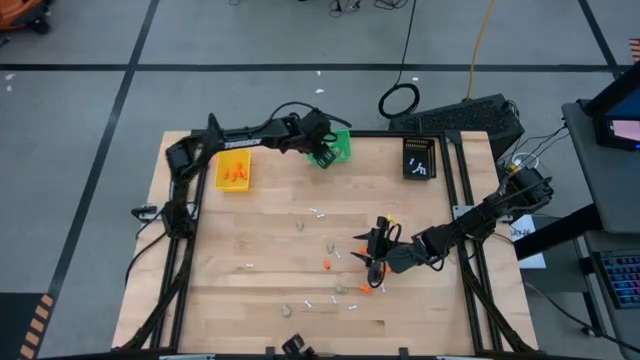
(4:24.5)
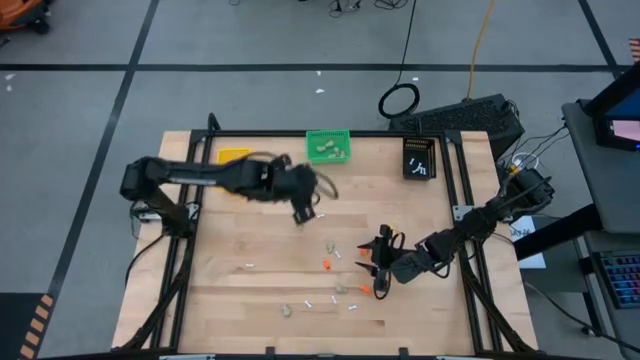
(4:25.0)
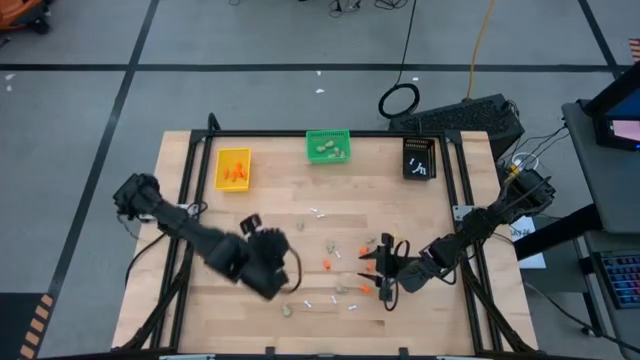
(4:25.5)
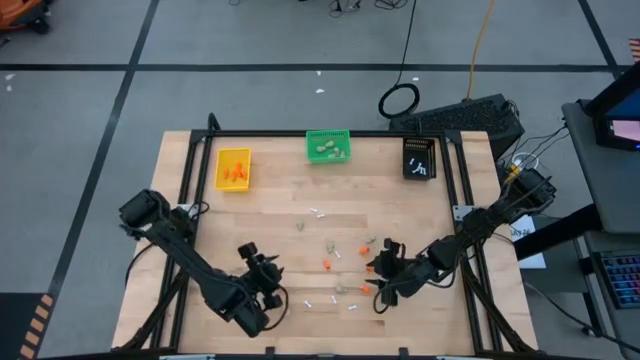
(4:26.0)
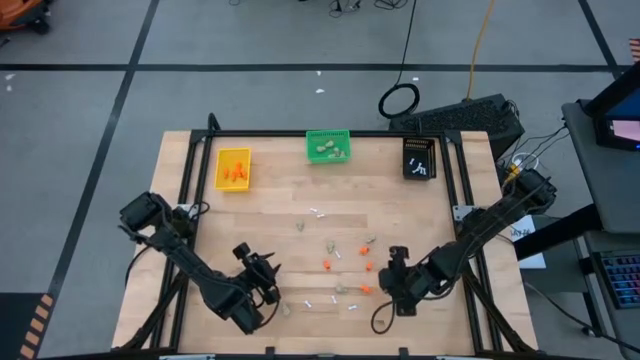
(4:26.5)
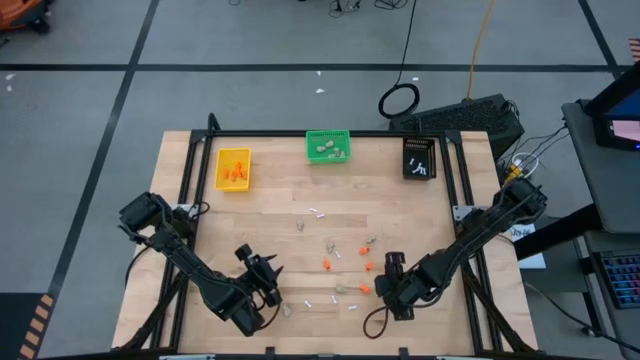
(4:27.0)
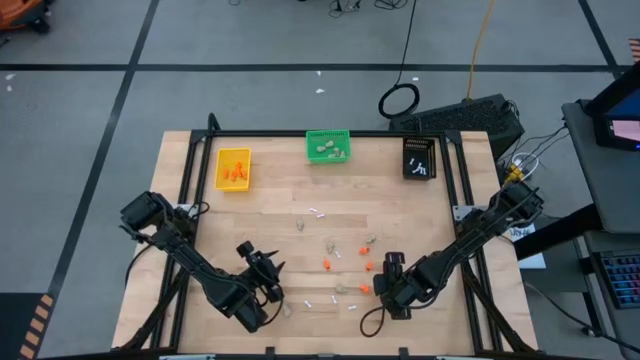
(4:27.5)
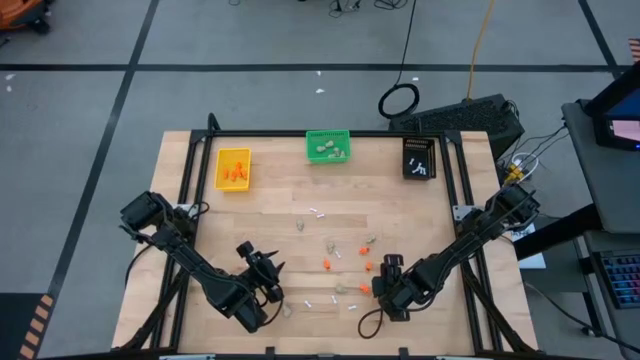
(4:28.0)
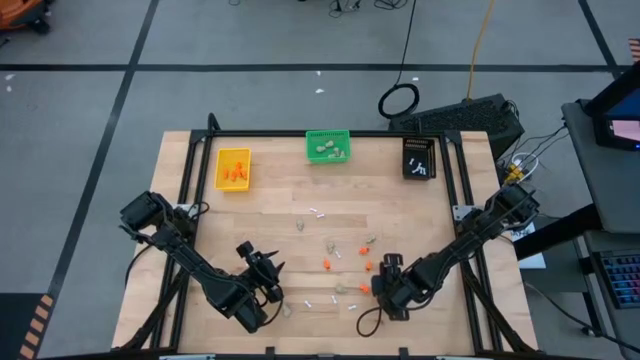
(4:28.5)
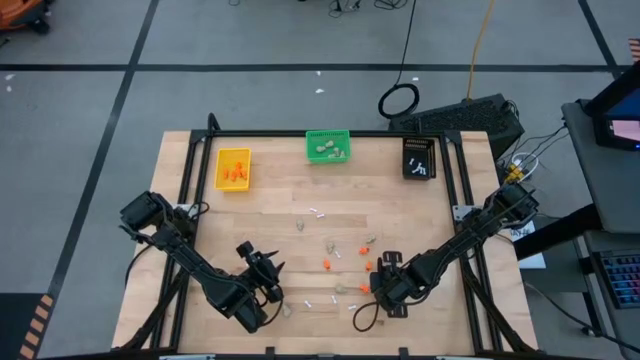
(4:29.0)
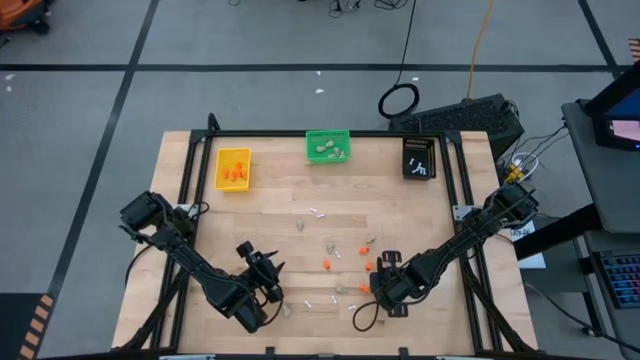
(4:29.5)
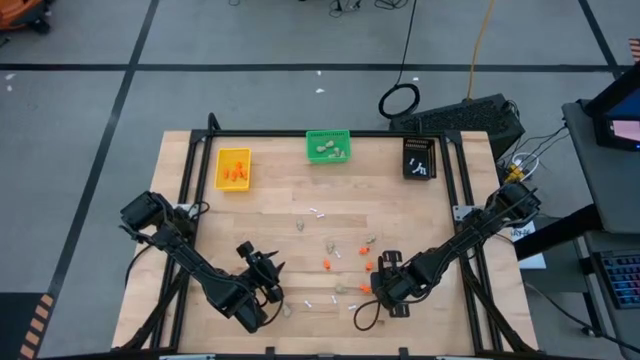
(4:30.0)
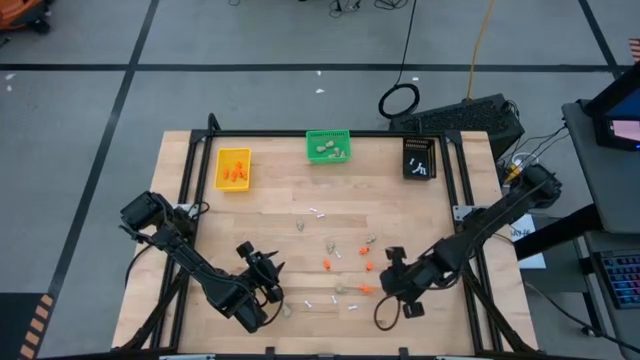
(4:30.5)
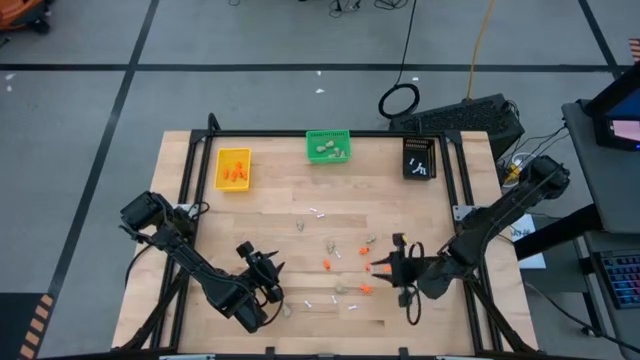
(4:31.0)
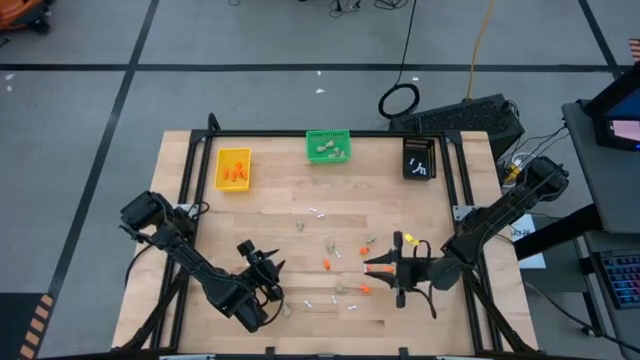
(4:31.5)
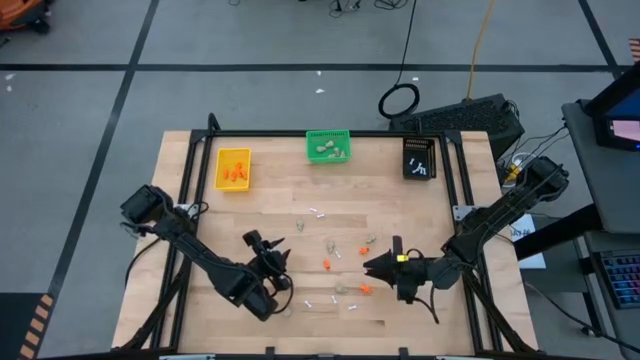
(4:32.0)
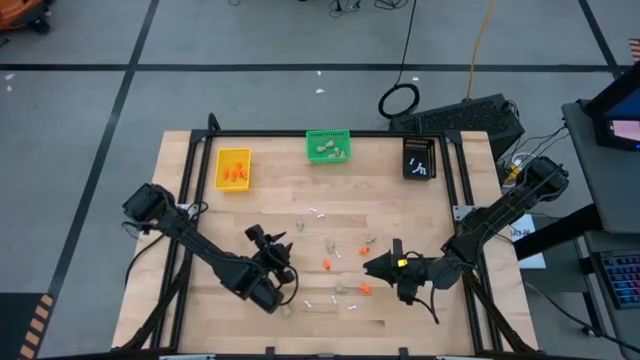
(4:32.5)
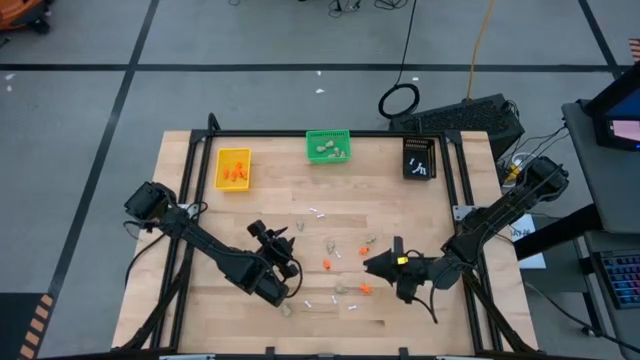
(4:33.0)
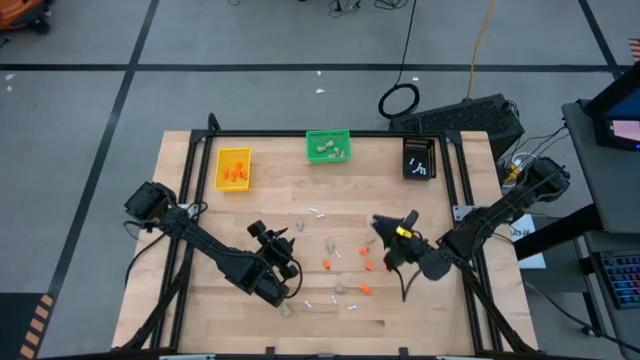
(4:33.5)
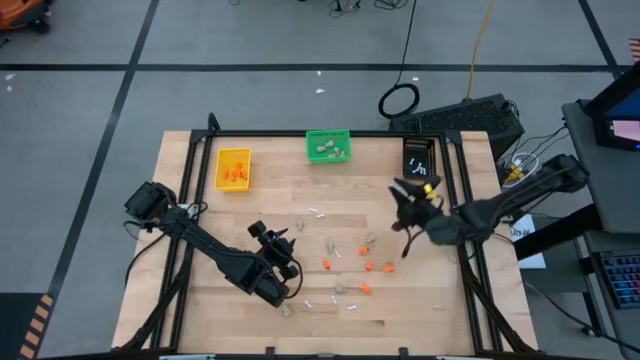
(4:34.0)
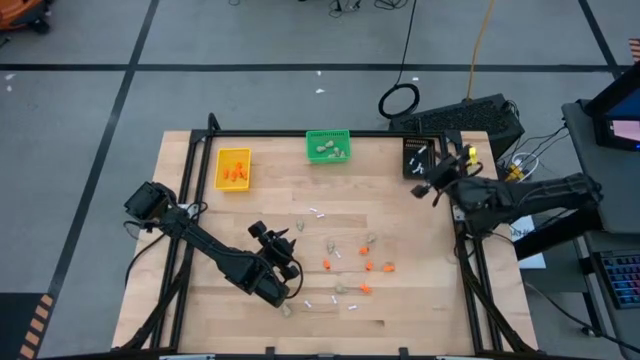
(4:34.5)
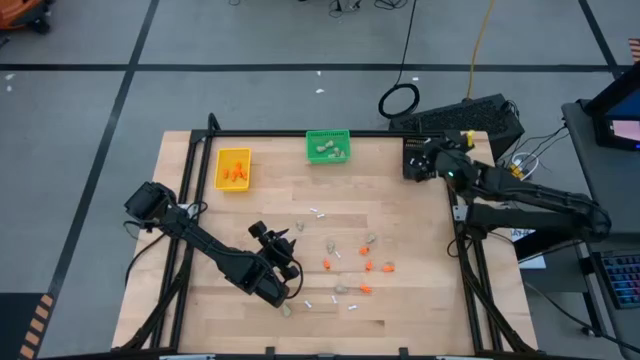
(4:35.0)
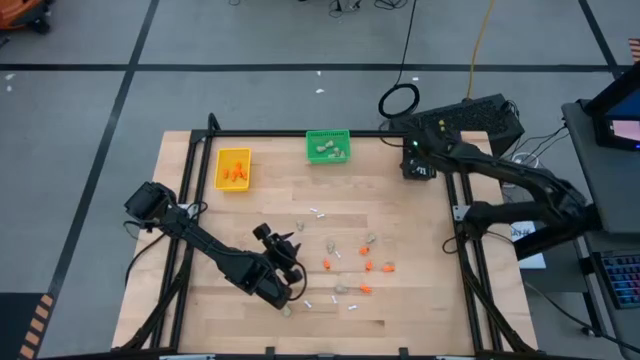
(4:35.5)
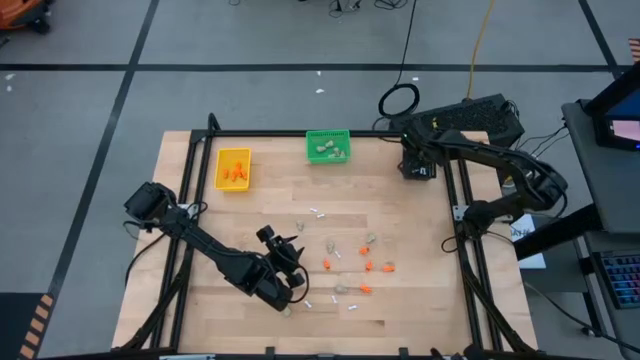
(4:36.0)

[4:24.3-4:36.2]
Task: Sort Halloween decoration
Put the white bone toy into the black bin

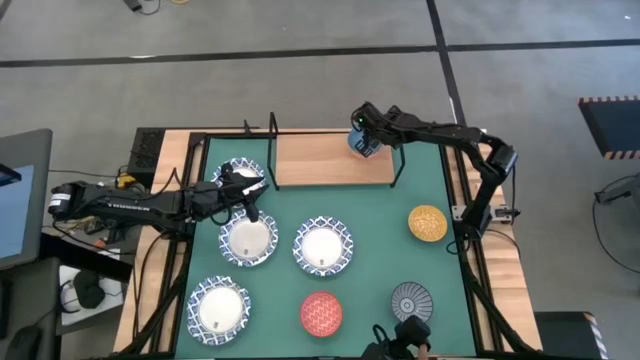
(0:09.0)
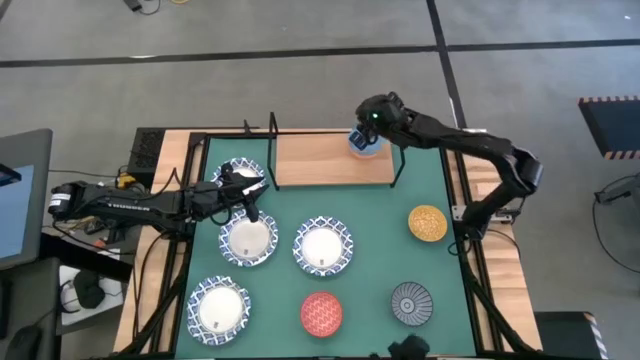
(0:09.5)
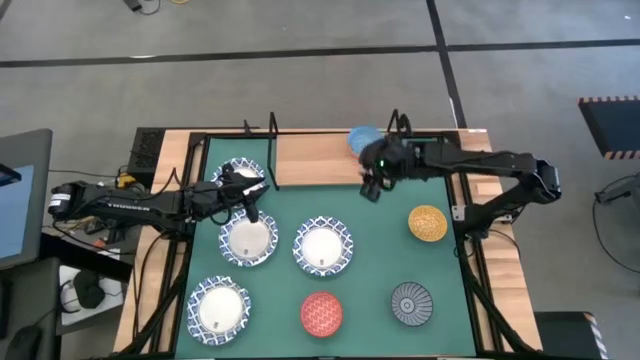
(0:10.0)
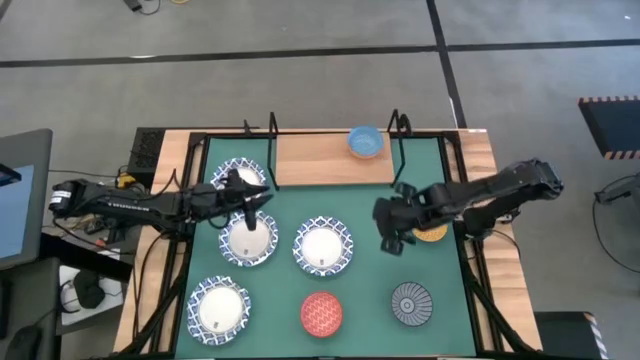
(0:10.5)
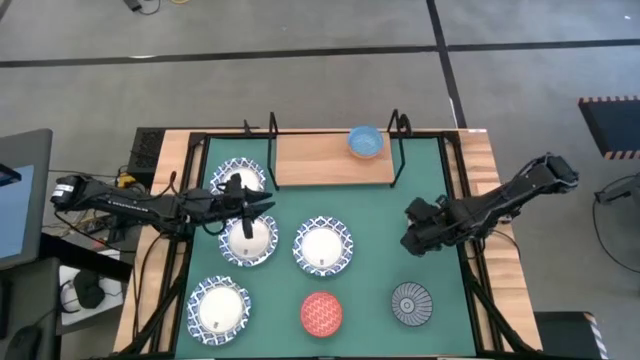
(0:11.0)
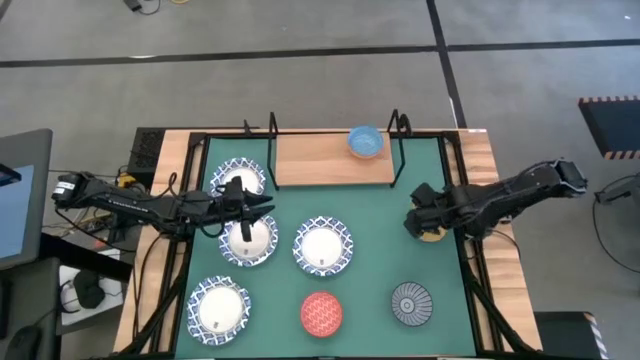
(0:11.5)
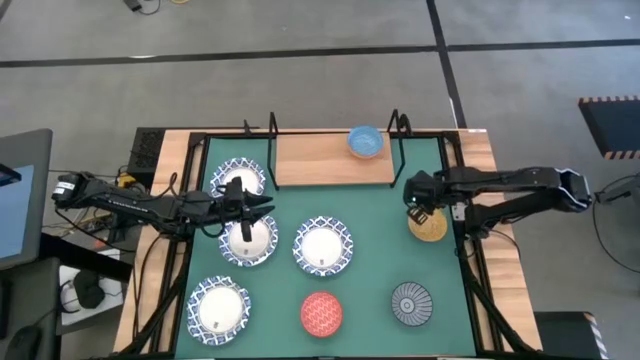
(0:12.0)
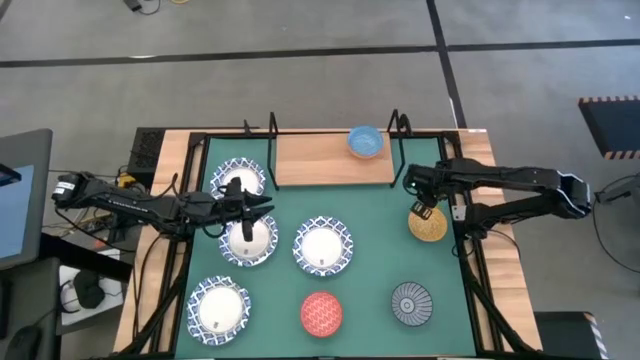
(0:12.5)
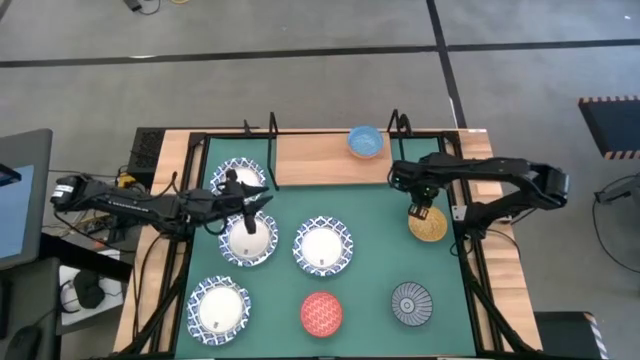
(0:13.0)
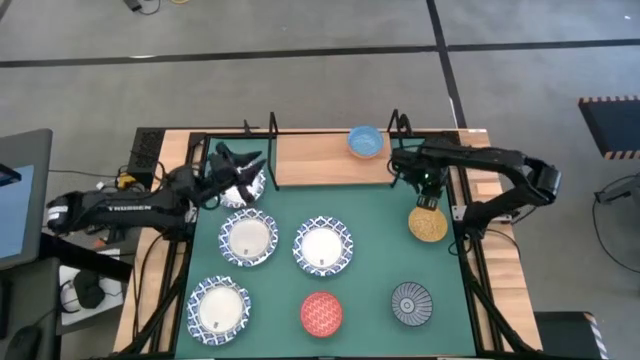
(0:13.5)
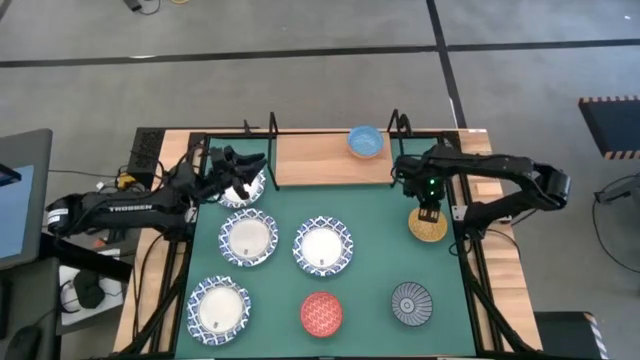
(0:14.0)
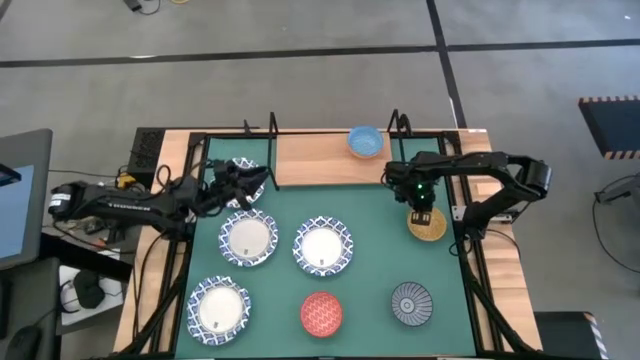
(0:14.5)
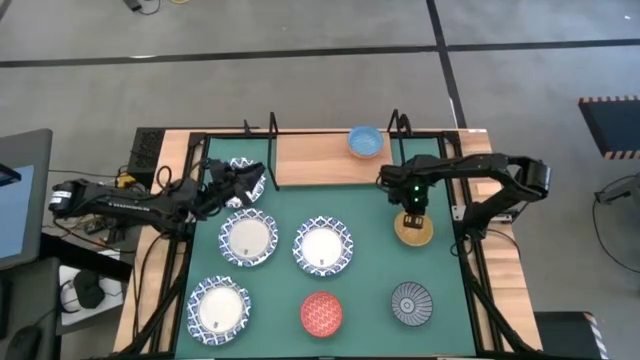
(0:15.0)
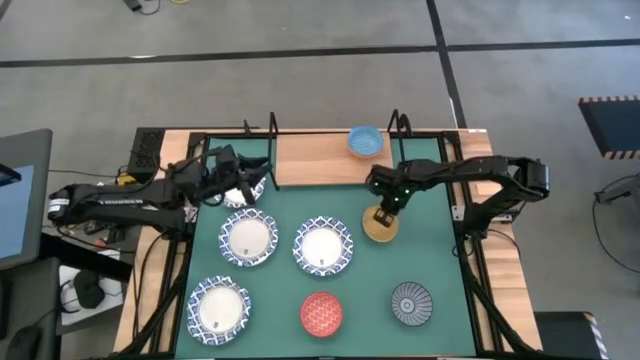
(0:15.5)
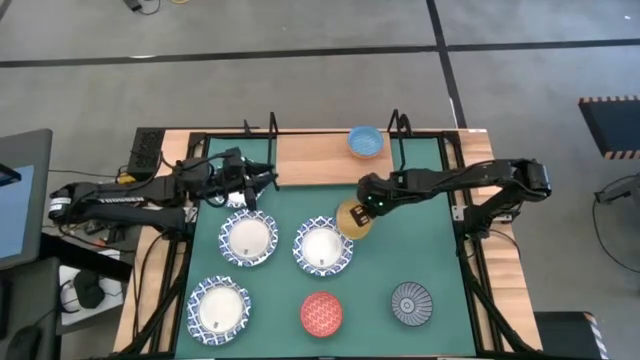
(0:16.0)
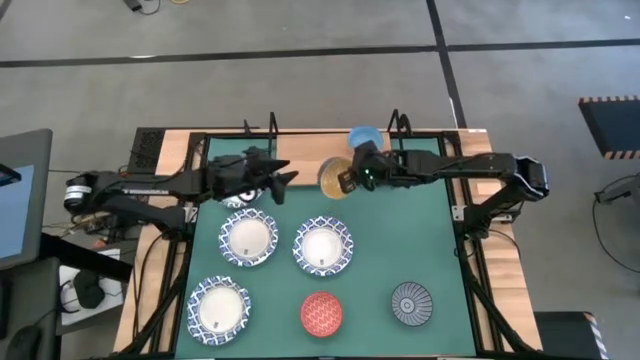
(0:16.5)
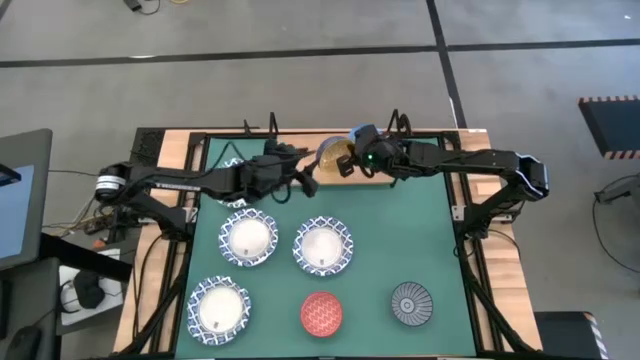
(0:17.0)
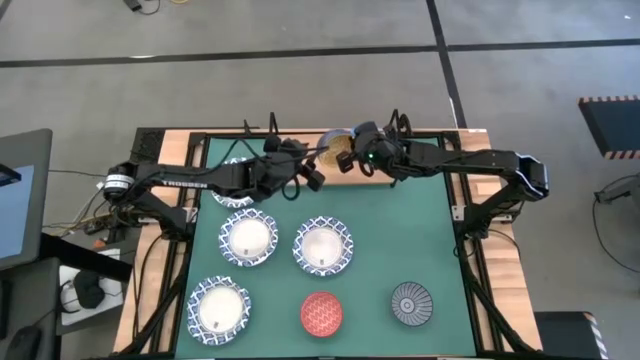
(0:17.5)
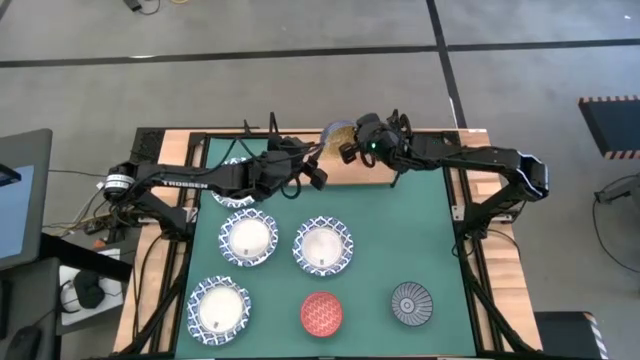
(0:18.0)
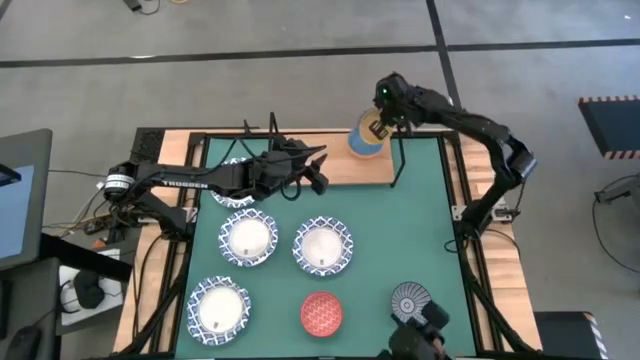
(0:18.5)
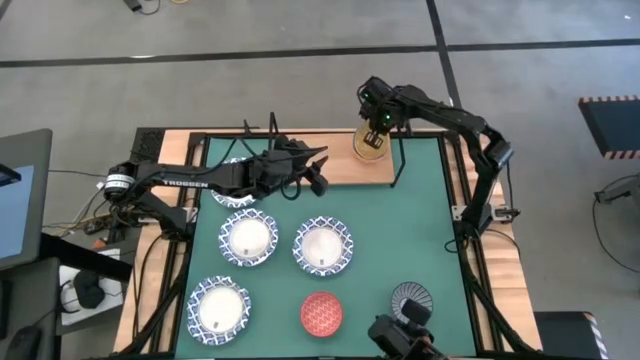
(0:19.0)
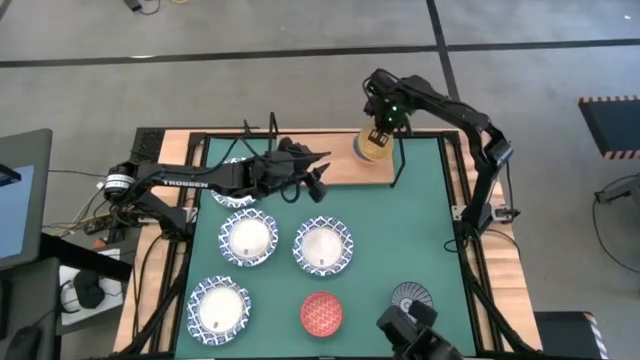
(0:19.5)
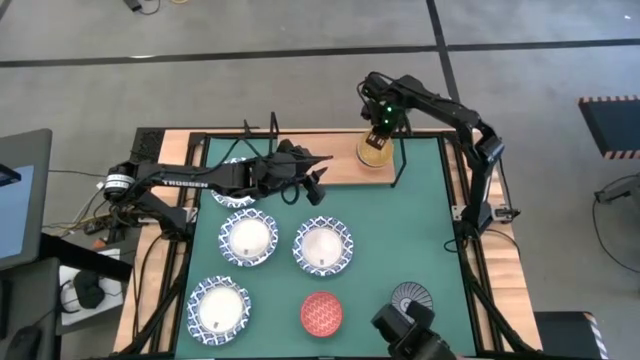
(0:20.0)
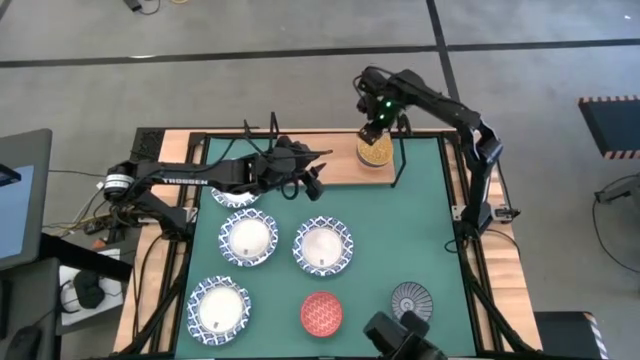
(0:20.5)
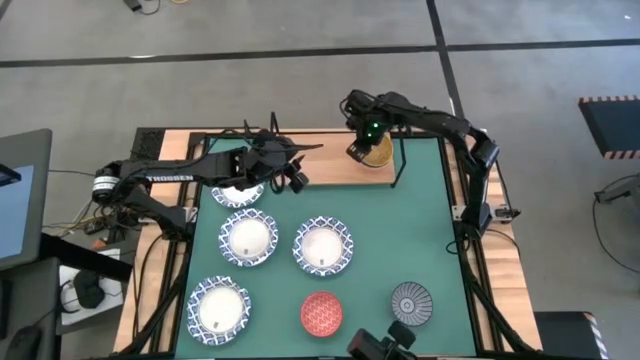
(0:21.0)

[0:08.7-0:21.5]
Task: Place and stack bowls onto a shelf
Stack the yellow ceramic bowl on top of the blue ceramic bowl on the shelf
